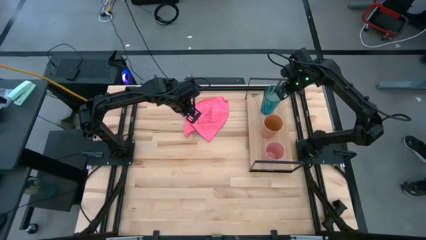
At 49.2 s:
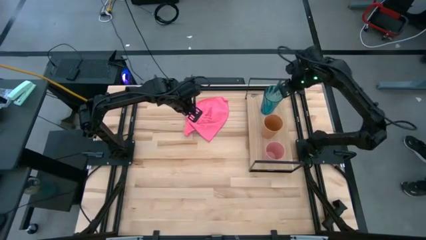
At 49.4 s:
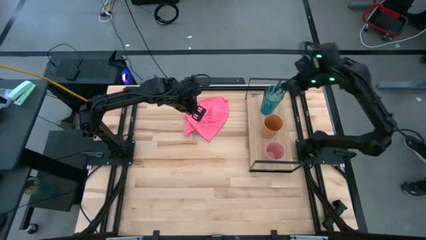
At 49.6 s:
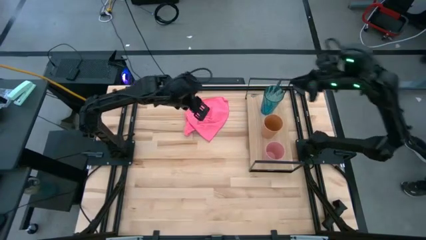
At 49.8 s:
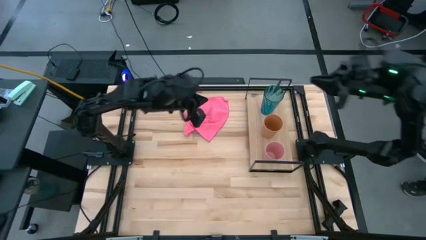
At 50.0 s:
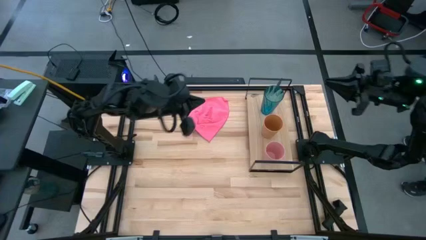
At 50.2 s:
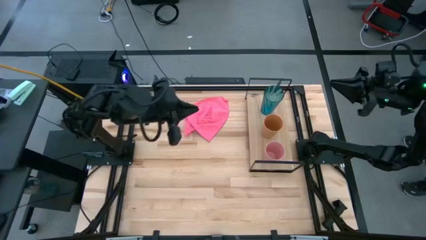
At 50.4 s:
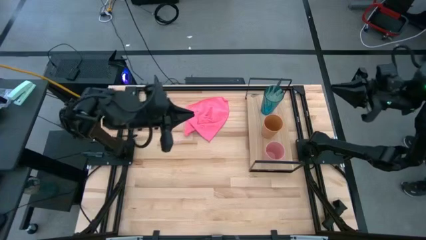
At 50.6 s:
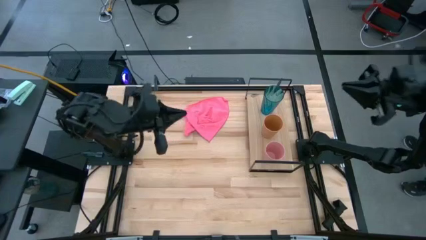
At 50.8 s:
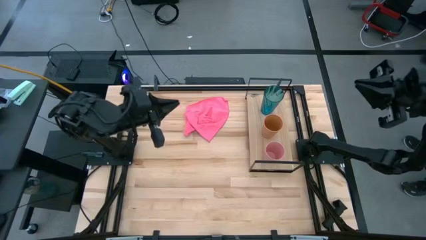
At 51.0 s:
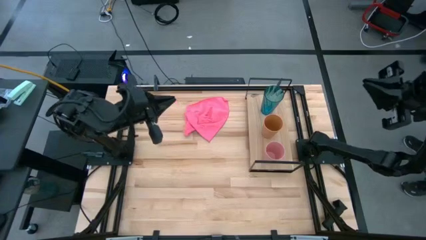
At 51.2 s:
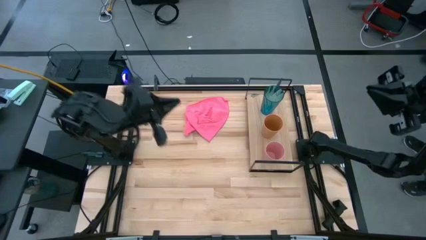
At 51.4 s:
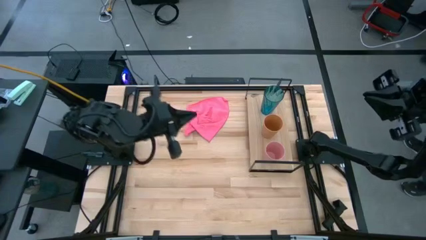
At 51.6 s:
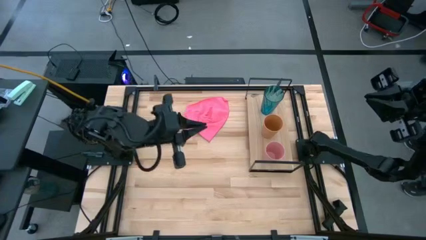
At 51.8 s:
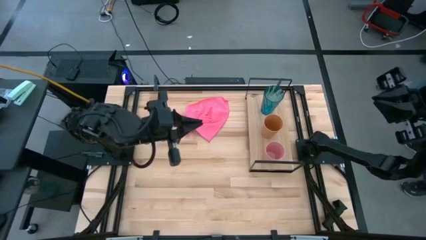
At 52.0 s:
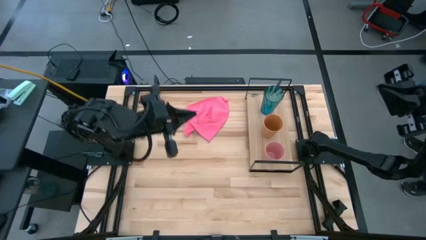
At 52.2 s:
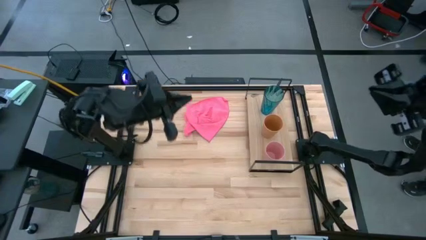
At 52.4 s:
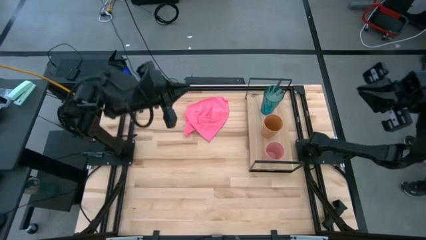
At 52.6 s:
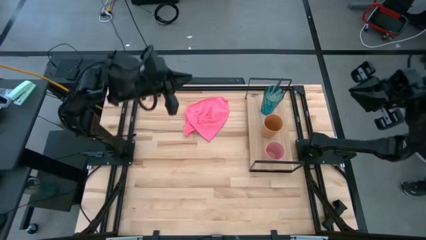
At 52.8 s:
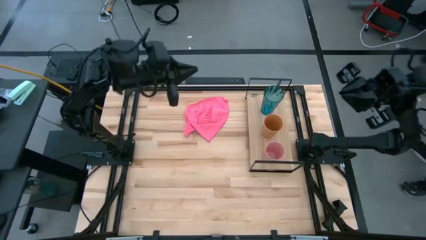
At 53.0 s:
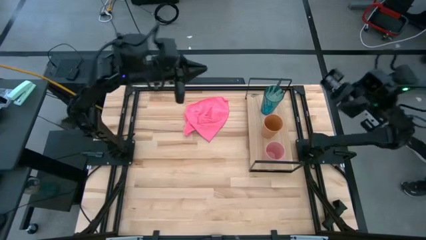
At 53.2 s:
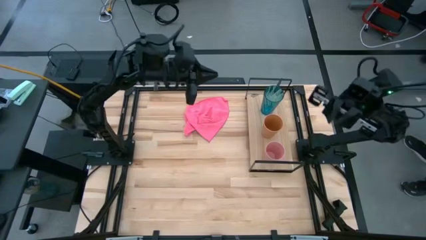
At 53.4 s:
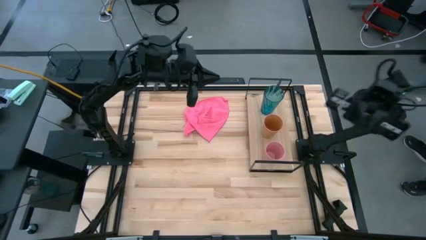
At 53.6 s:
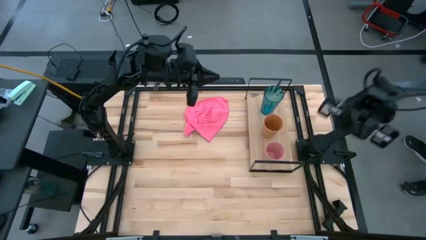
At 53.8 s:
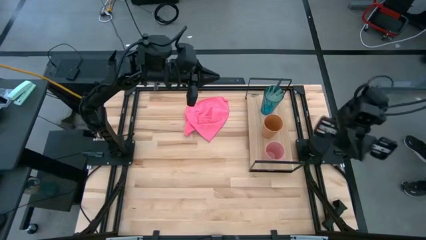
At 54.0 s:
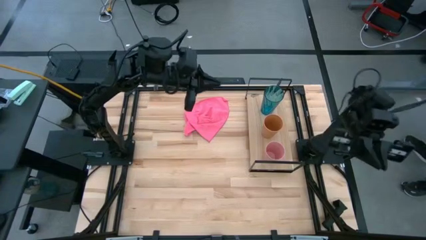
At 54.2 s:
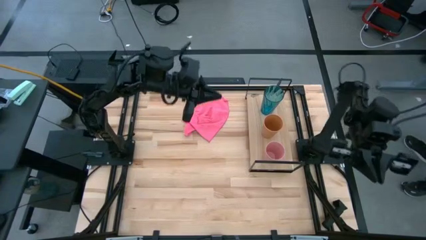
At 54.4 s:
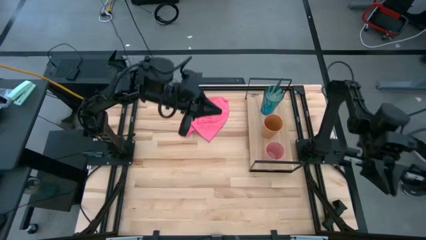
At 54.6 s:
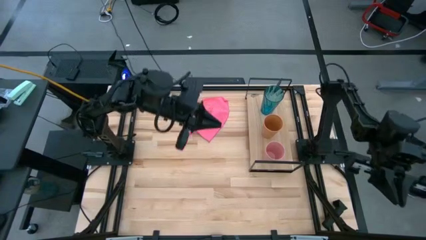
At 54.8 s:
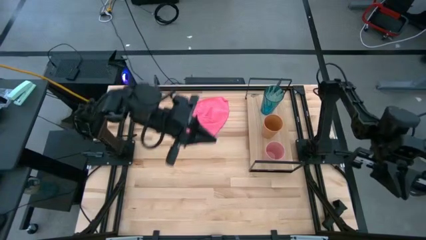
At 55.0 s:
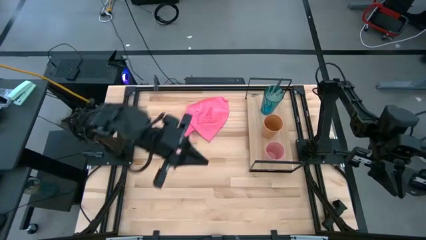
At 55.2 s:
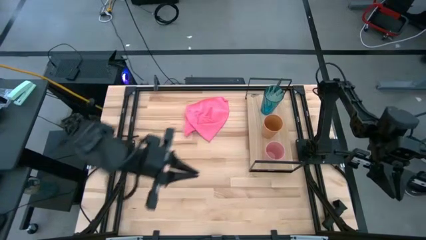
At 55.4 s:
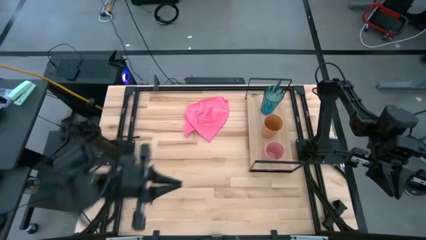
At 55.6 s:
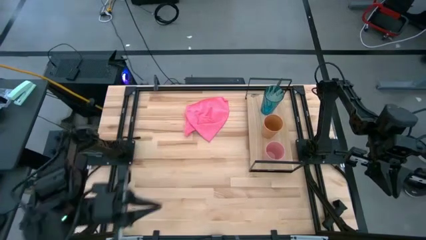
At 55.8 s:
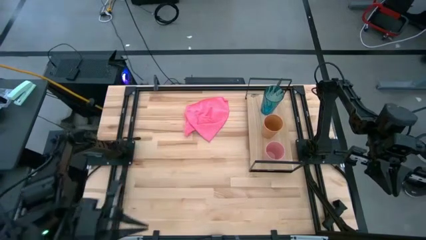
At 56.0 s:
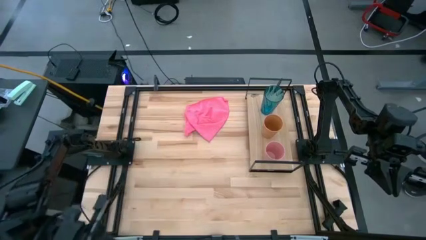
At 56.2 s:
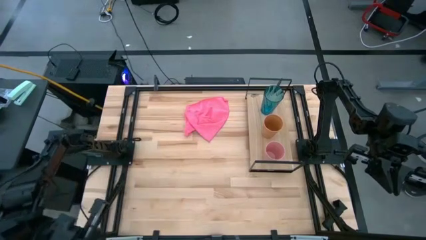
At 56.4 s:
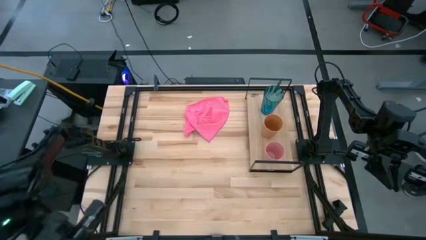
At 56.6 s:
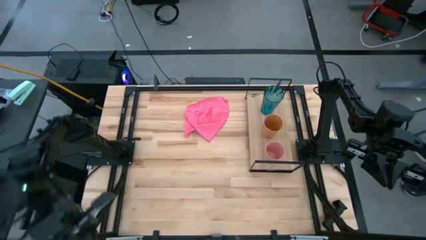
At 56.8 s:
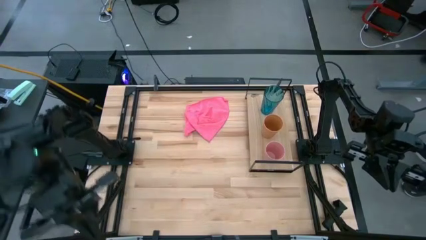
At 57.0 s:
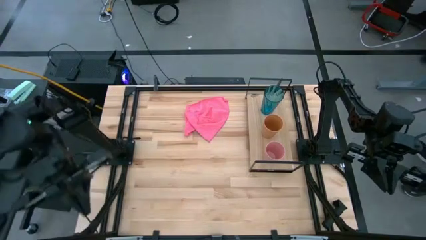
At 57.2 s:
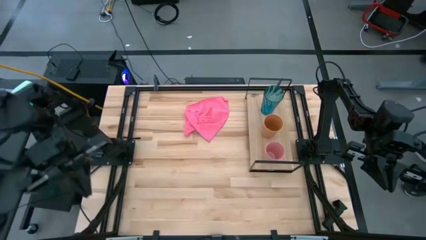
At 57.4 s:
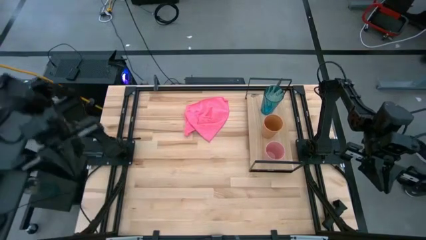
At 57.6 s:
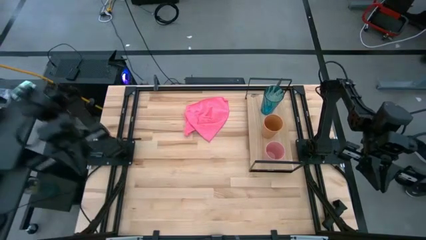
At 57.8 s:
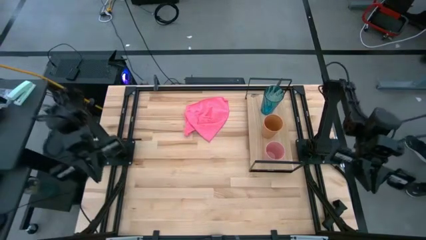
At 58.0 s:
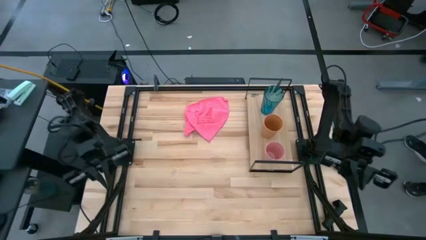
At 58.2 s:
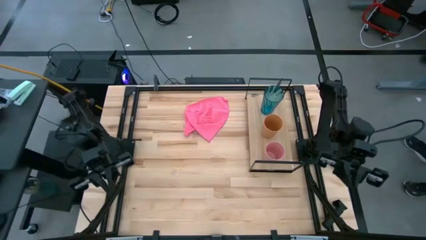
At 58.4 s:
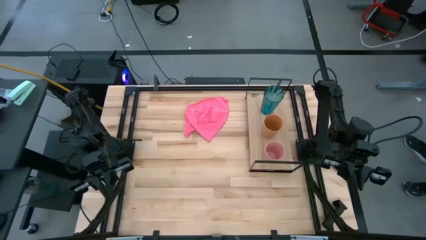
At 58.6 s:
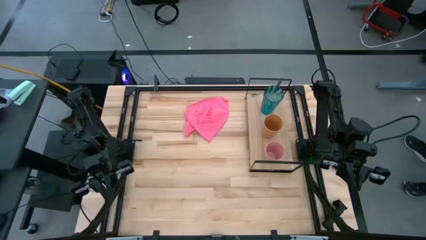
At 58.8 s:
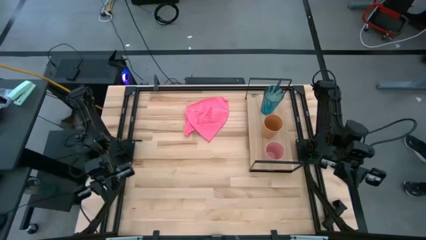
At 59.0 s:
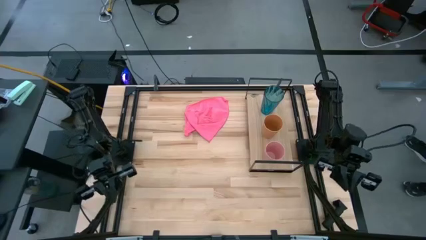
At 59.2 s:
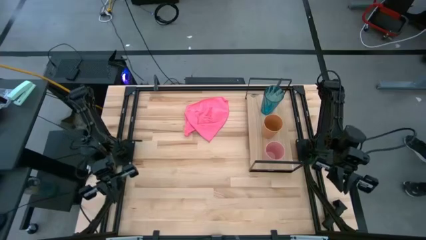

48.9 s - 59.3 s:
Task: Stack small to large cups/mugs on shelf
Return to Home Position

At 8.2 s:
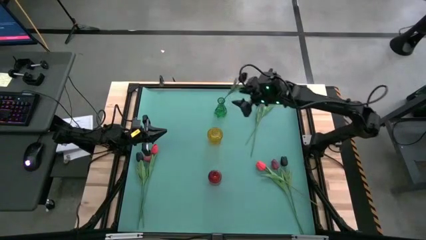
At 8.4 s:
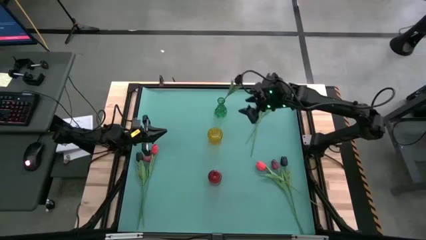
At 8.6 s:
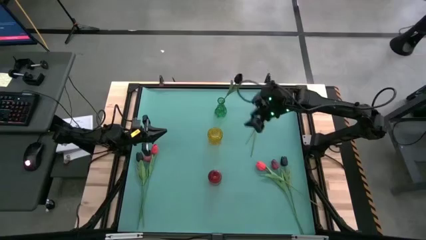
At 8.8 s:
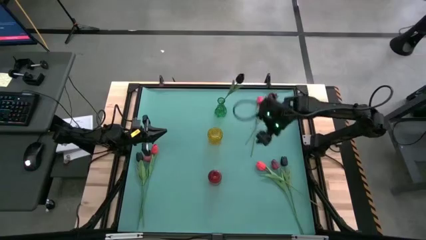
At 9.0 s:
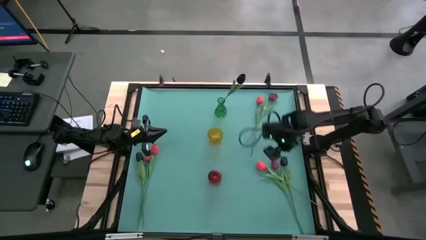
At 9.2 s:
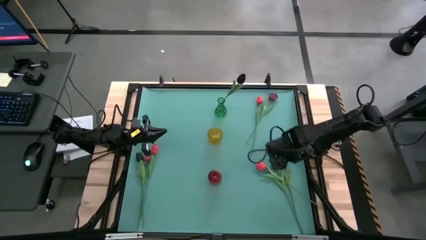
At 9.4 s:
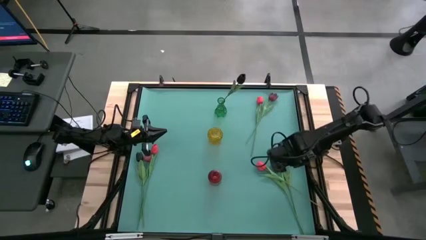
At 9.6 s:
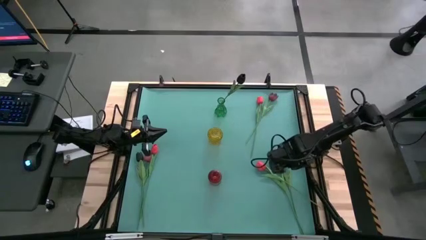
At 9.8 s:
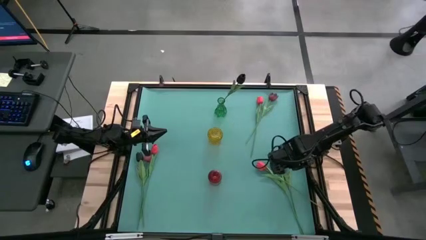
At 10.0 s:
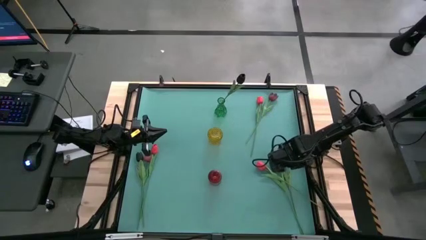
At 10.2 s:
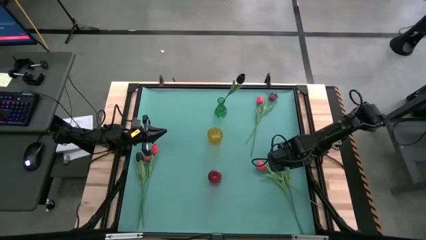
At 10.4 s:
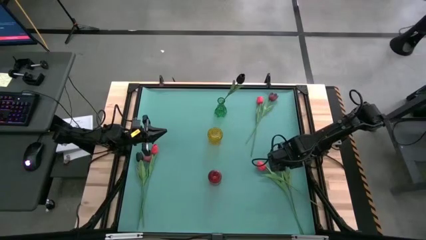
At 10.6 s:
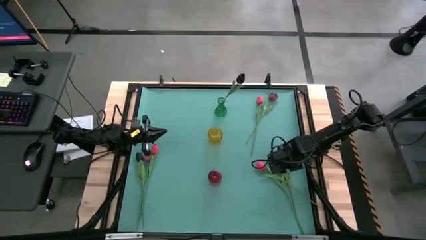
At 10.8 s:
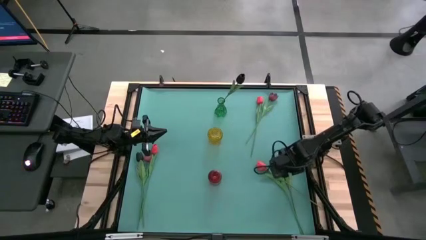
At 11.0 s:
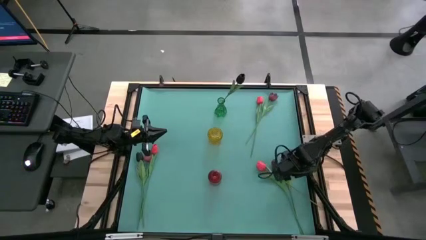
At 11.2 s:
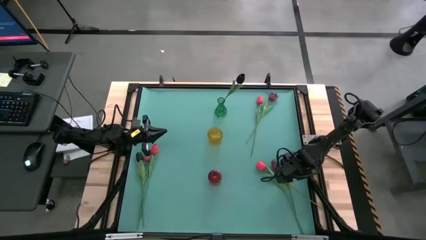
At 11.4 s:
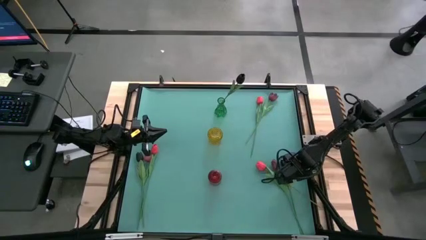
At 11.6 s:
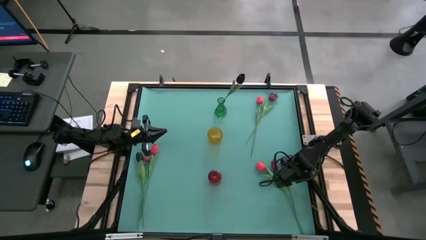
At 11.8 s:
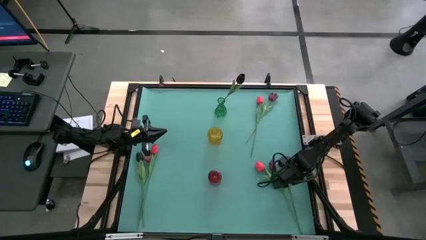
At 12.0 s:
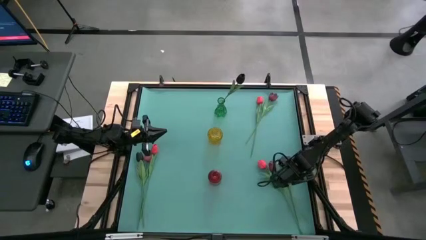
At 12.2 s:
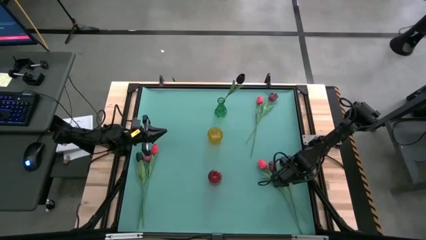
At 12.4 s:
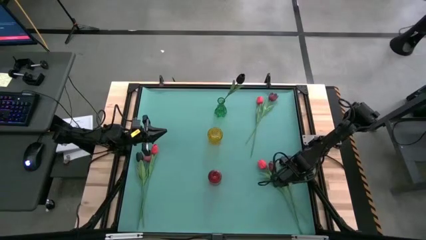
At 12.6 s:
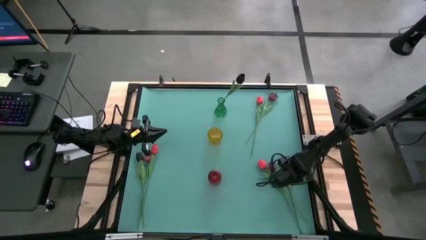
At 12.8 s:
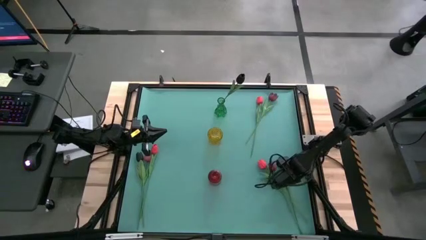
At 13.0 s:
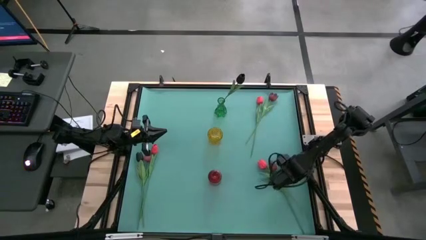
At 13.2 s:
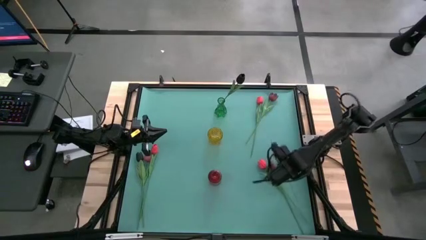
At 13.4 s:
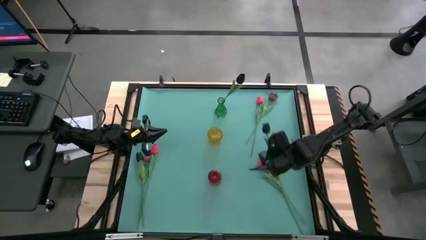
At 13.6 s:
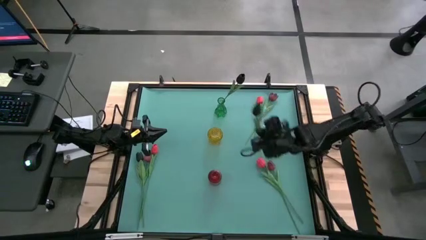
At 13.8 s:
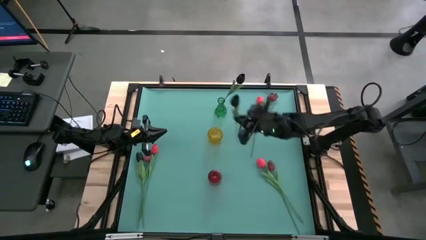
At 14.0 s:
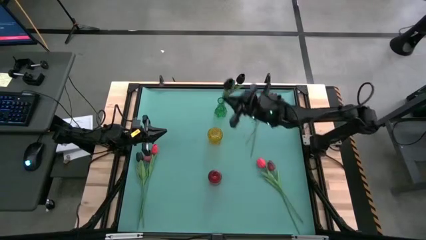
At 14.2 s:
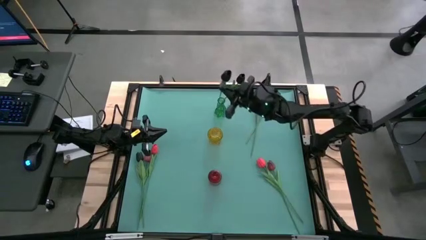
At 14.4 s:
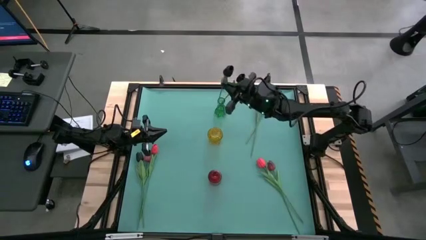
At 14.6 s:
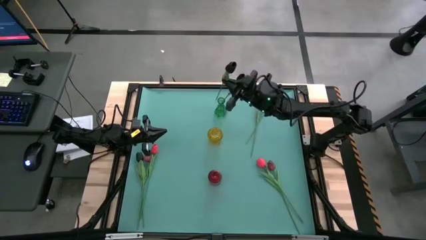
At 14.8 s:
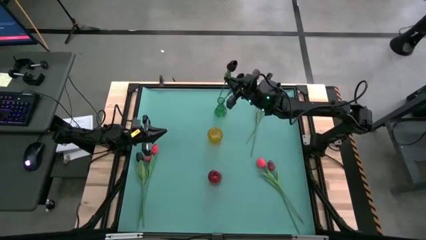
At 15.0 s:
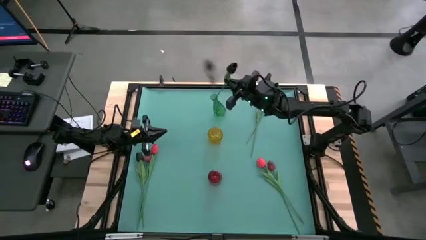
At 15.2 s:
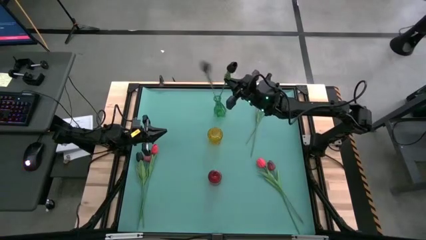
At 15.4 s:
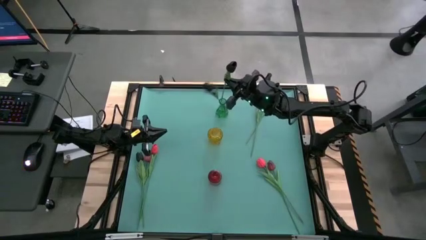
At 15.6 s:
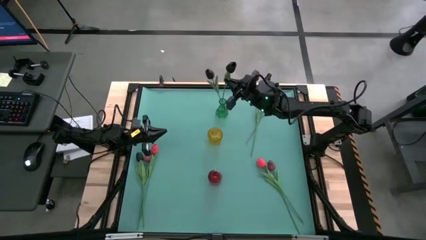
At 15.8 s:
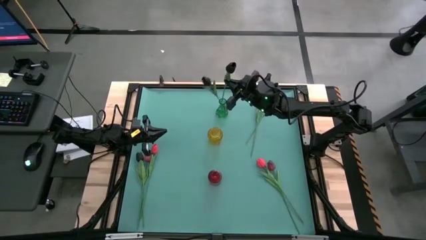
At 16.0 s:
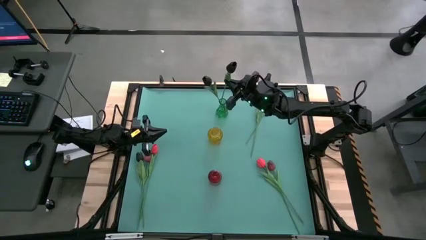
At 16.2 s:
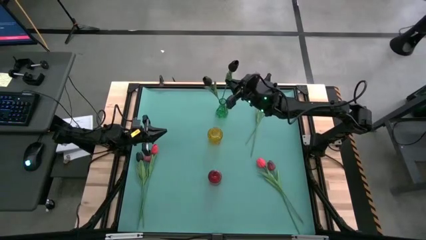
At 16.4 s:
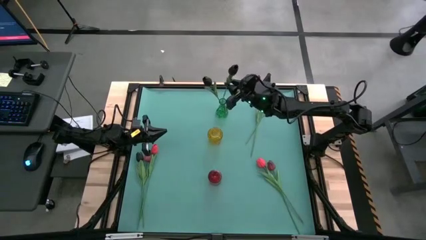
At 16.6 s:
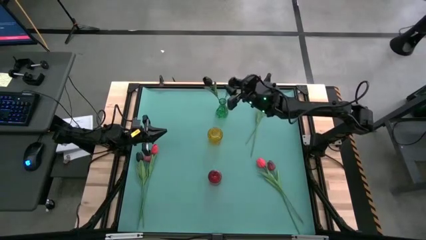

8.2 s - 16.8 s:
Task: Sort flowers into vase by color
Put the right black tulip into the green vase
